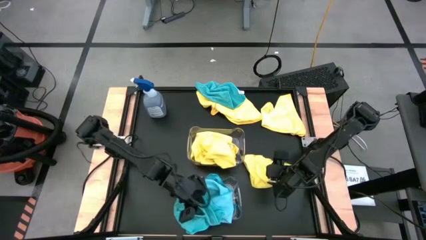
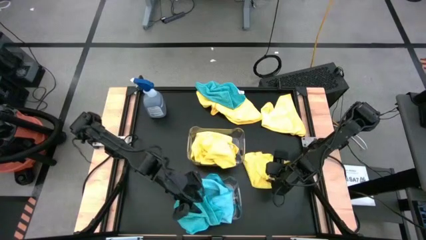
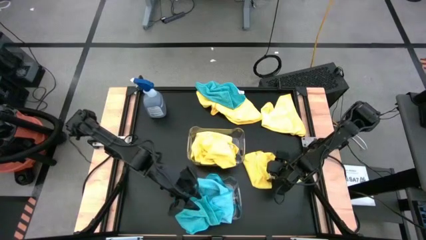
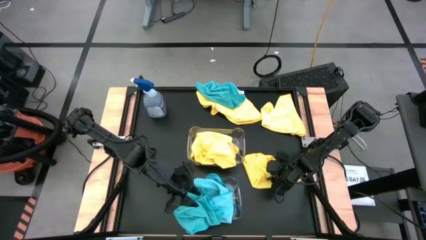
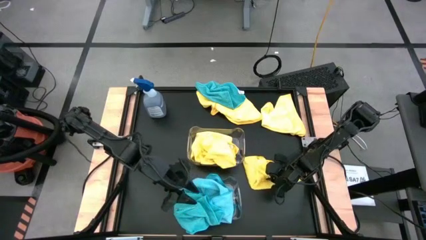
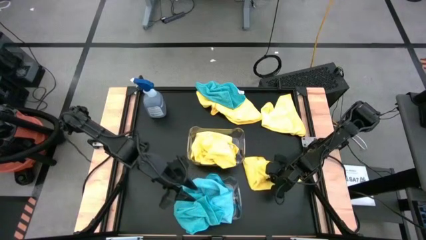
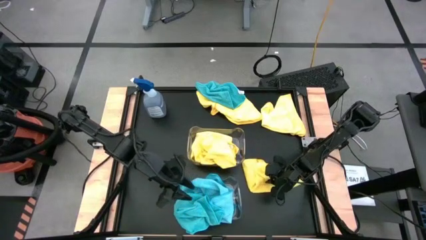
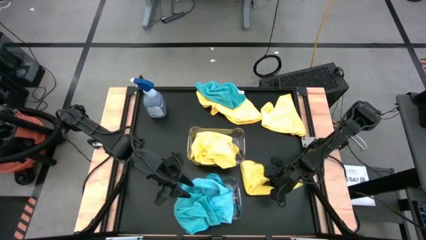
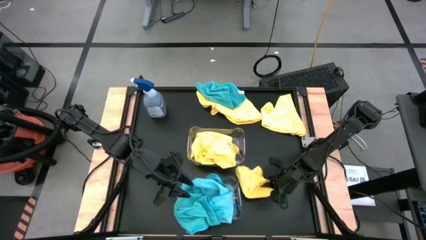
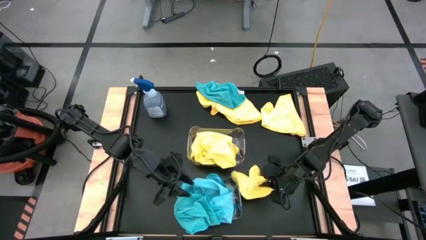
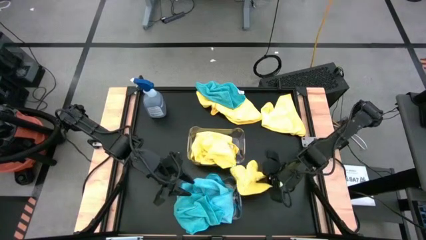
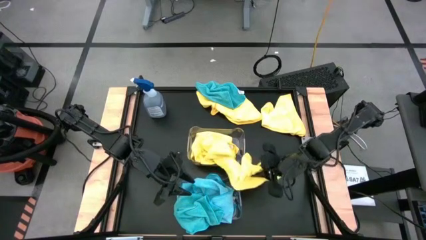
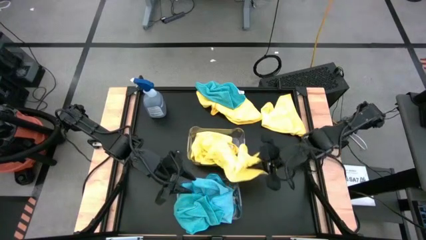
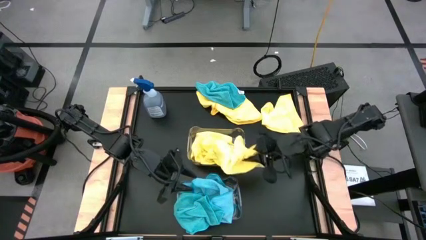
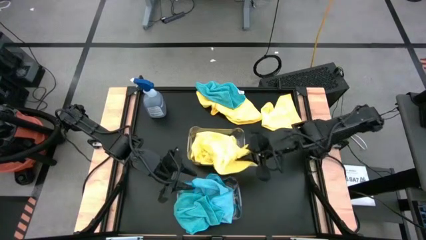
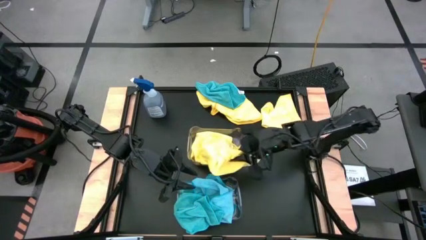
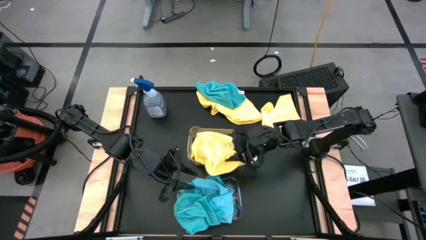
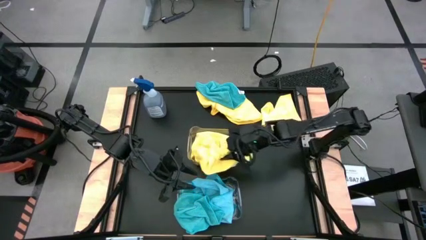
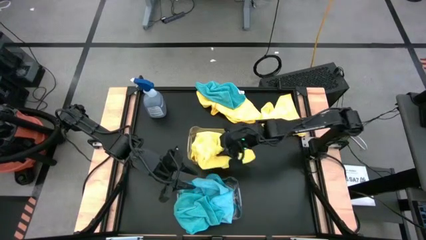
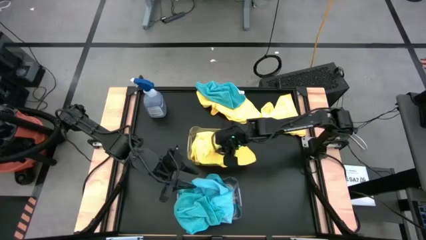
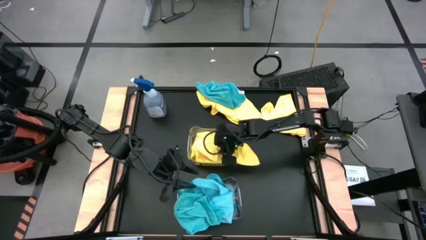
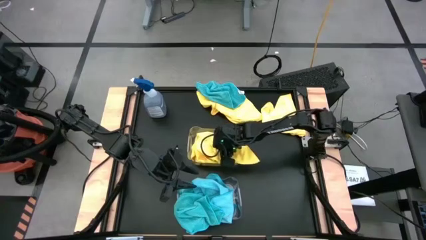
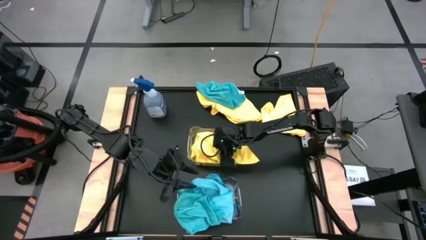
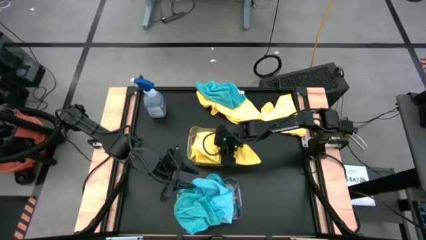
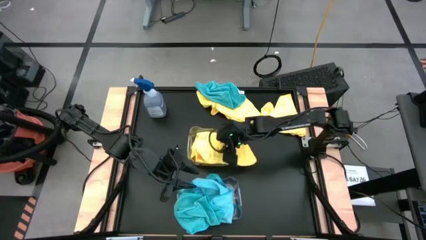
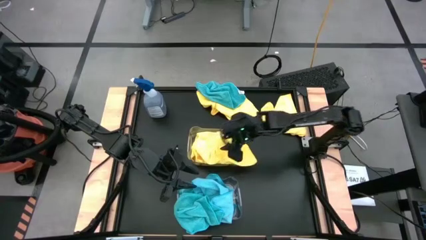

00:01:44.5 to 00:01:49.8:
Task: Sort microfiber towel by color & place in baskets
Put the yellow microfiber cloth into the top transparent bin

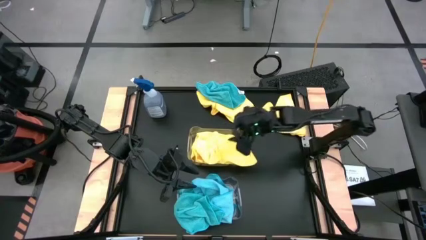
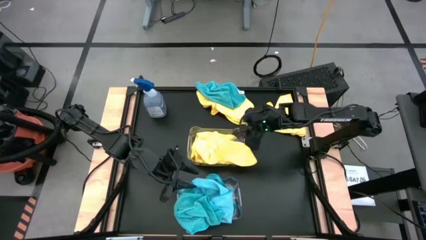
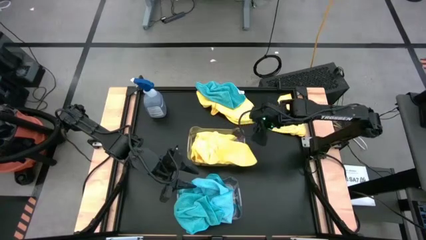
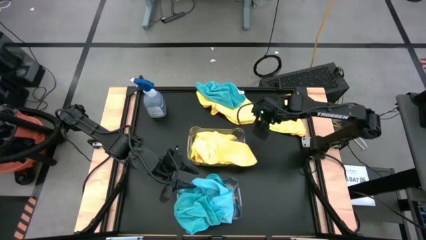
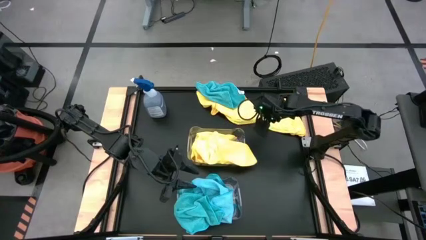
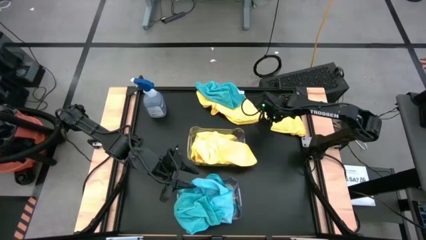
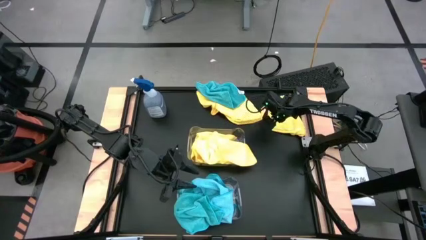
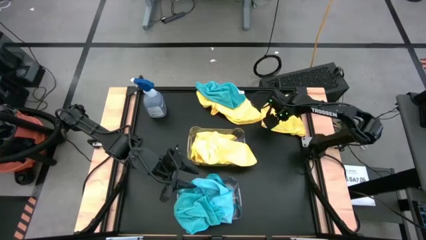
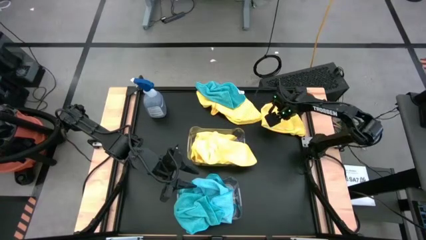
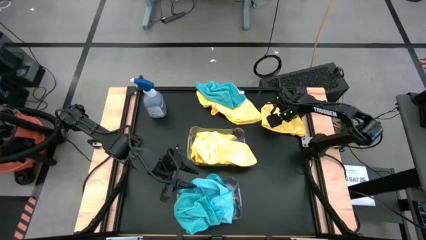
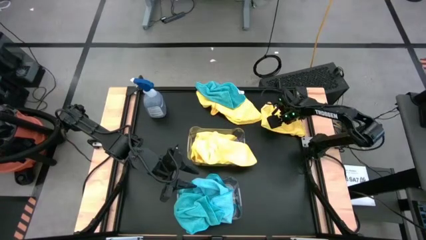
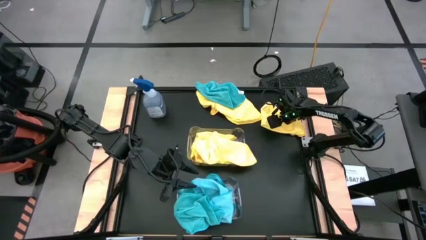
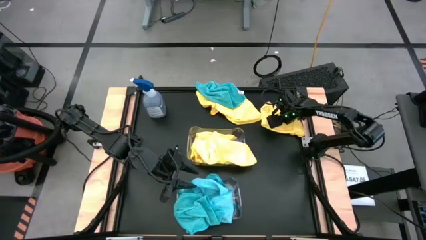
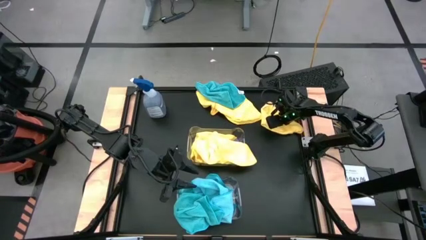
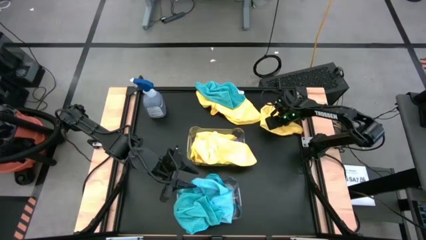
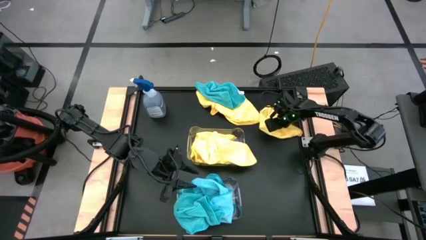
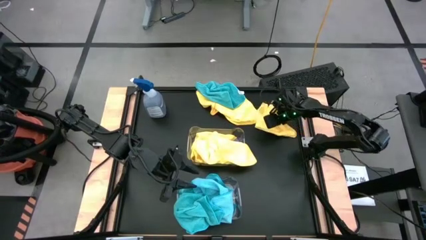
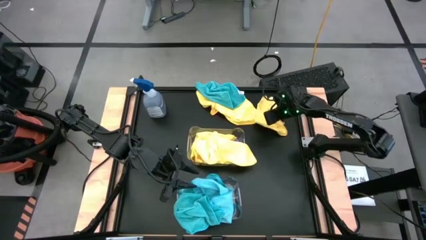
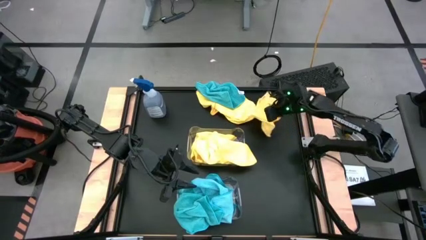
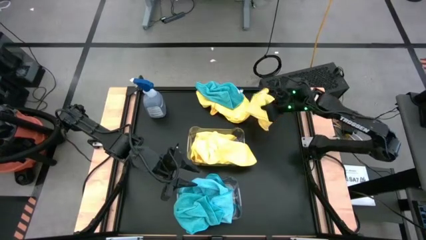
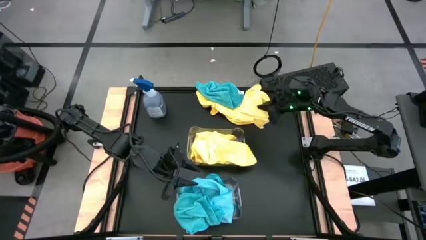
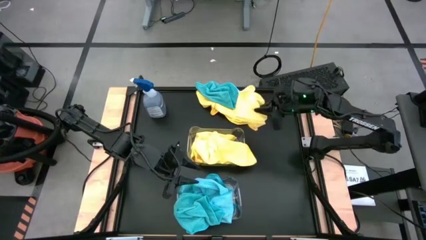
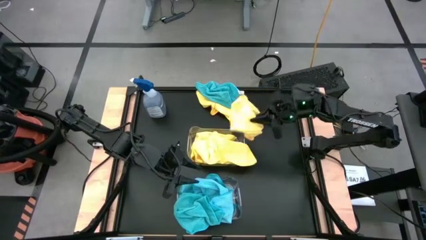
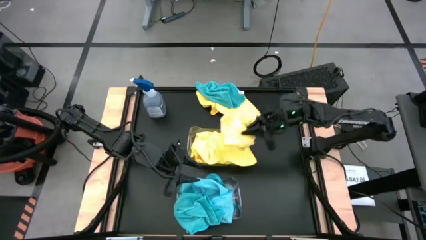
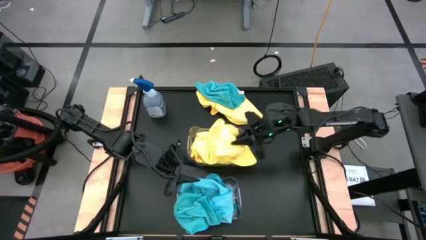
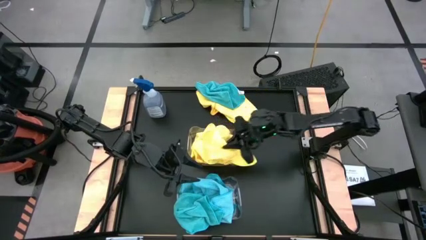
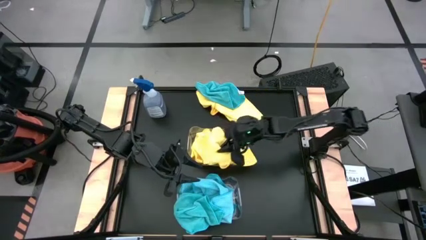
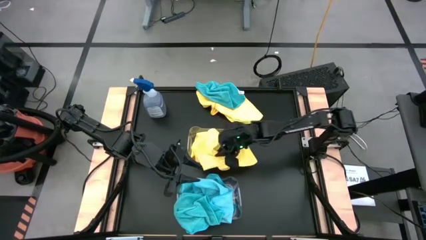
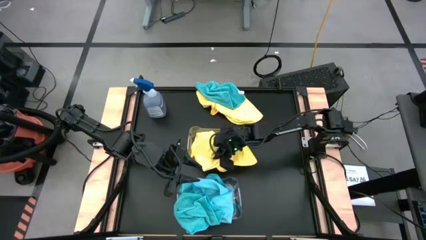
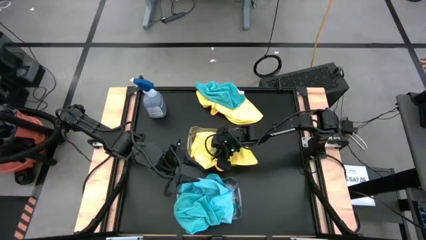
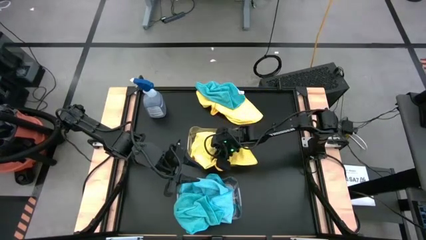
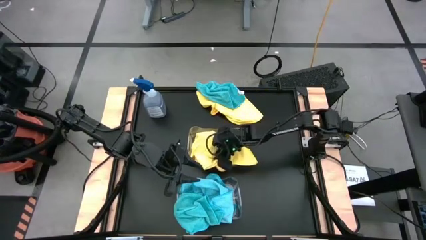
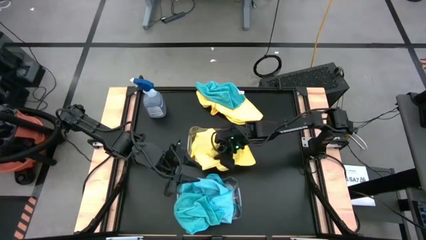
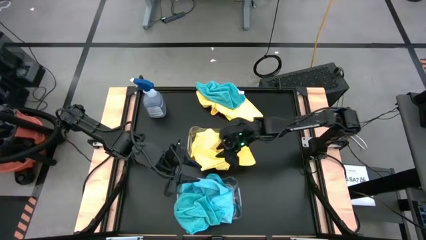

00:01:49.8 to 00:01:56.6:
Put the yellow microfiber cloth into the top transparent bin

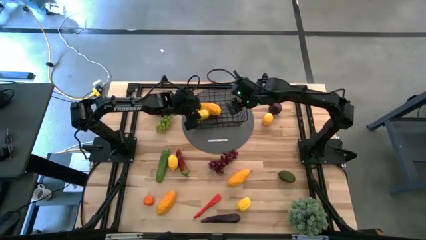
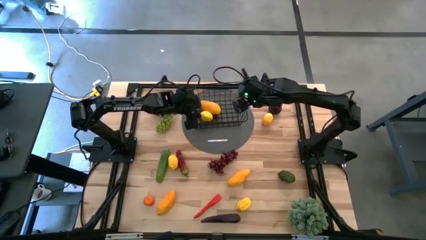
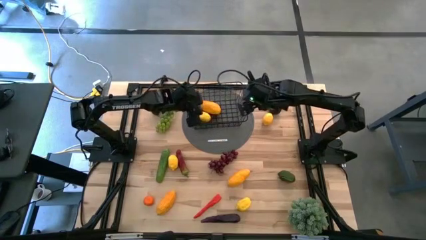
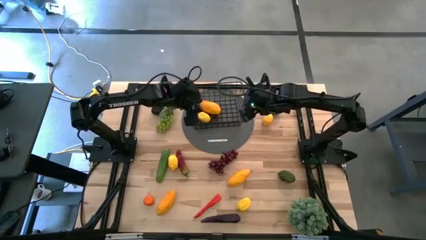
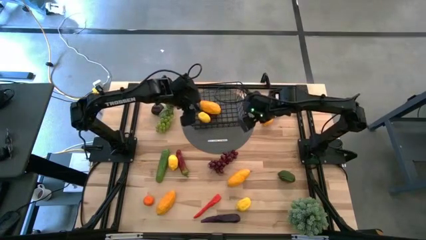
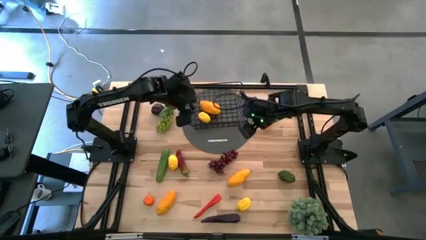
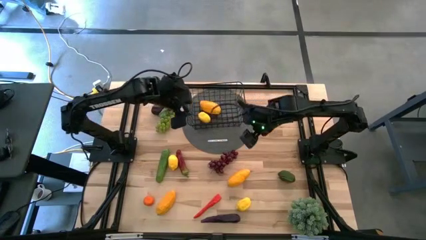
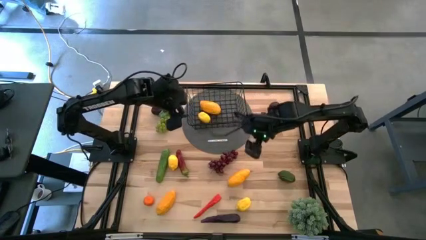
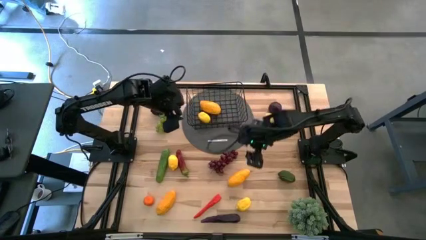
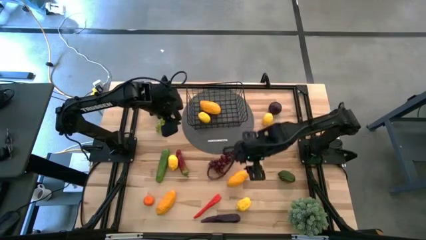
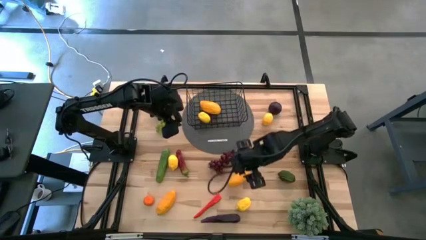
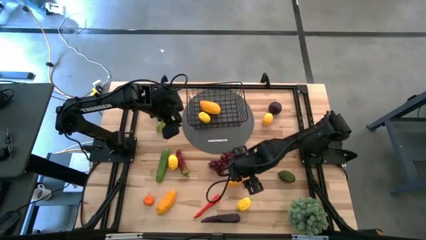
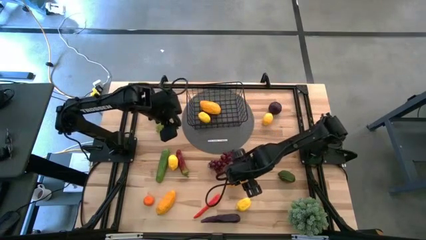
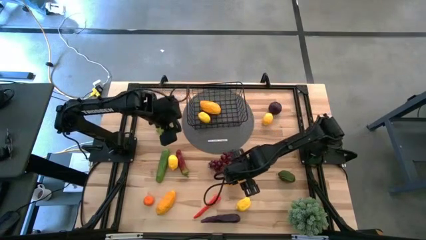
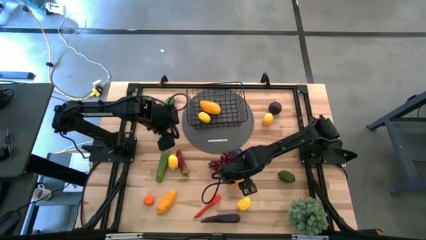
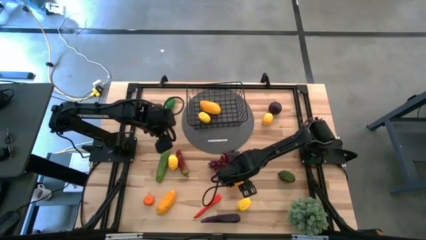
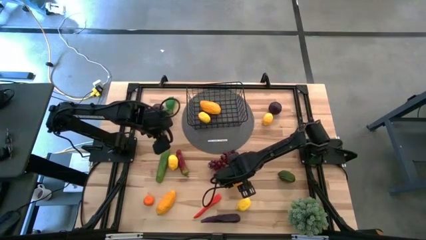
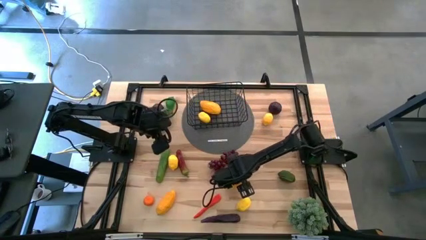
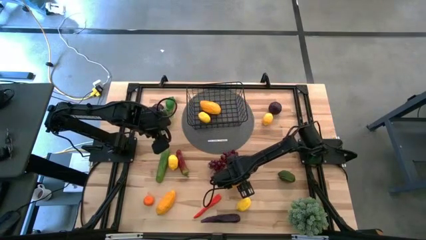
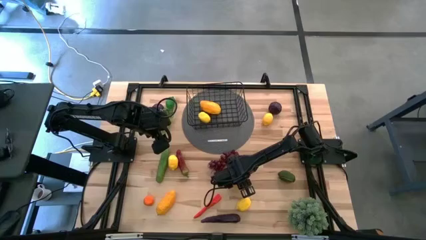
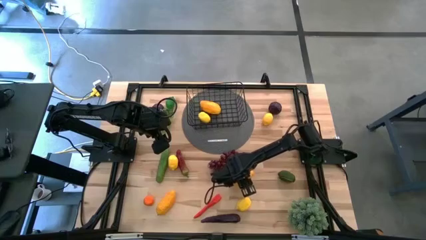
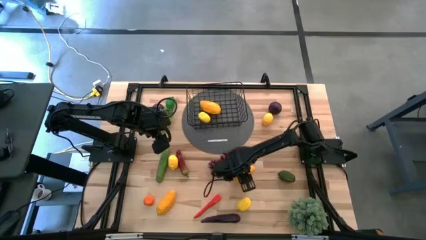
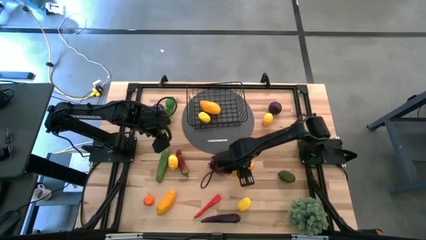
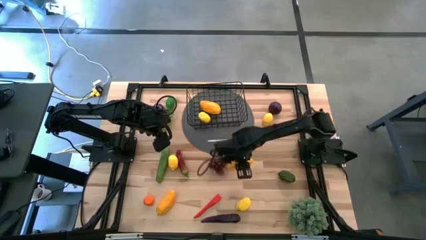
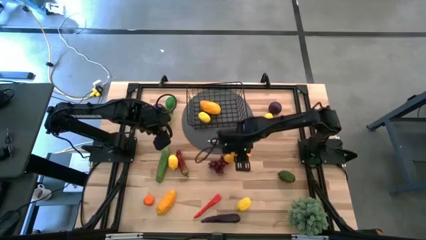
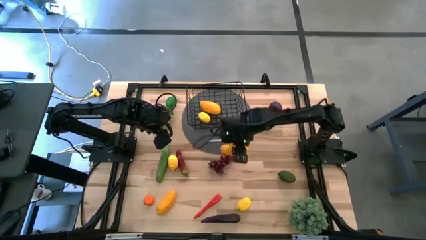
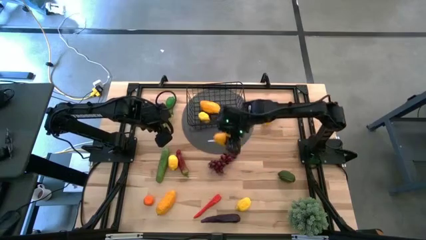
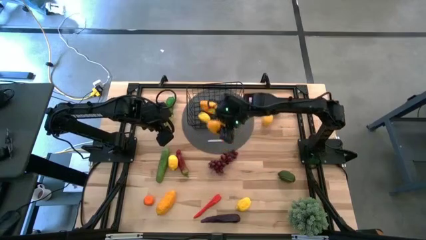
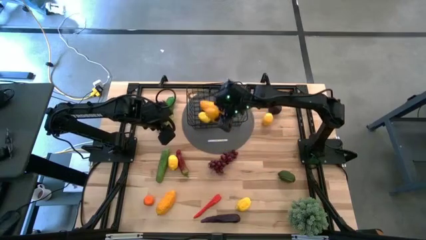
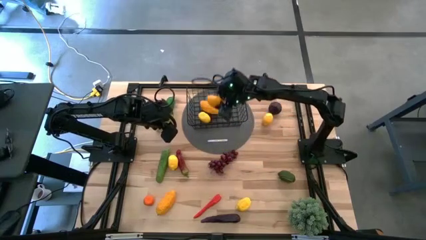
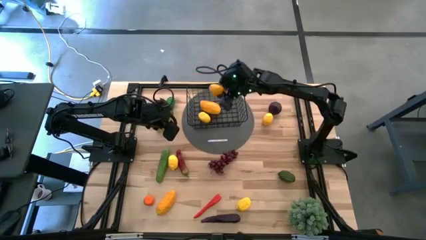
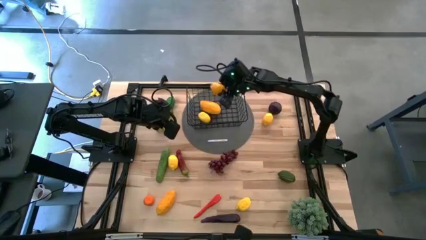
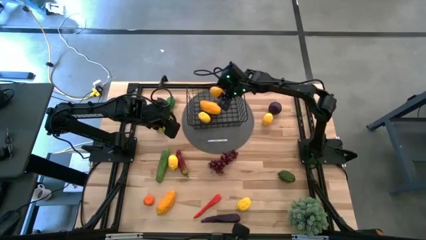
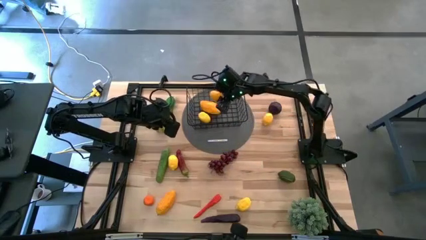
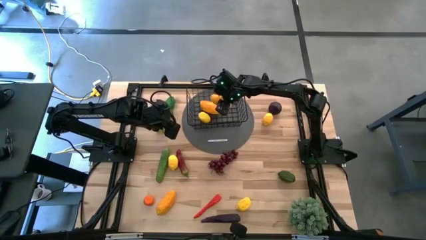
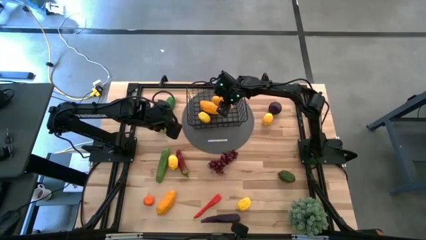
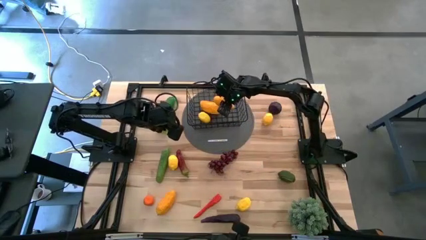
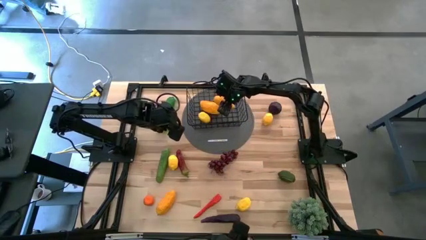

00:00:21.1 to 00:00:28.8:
Task: Build produce basket
Put the top mango into the wire basket
